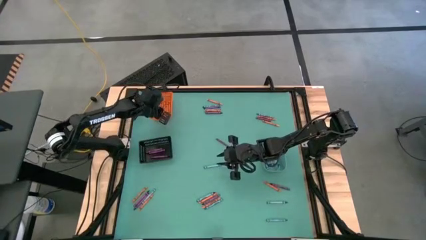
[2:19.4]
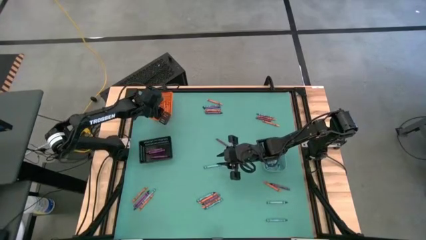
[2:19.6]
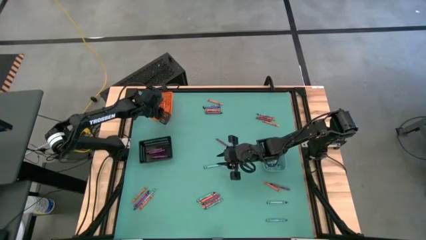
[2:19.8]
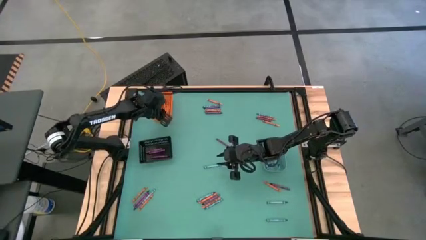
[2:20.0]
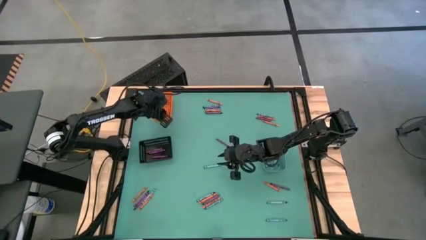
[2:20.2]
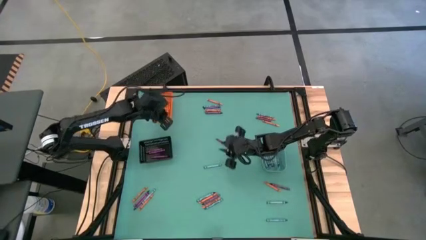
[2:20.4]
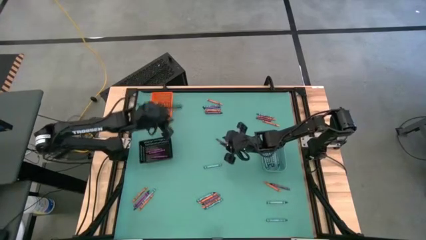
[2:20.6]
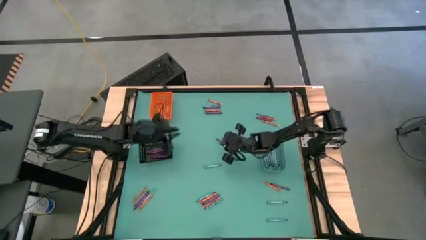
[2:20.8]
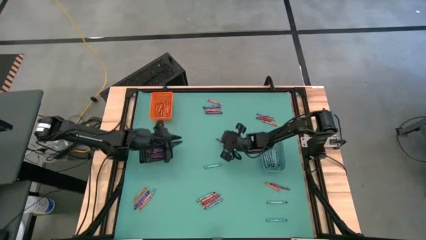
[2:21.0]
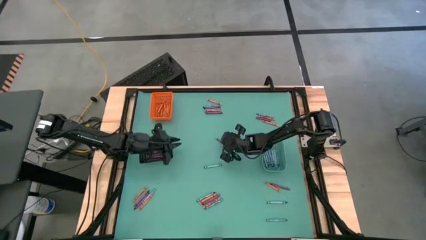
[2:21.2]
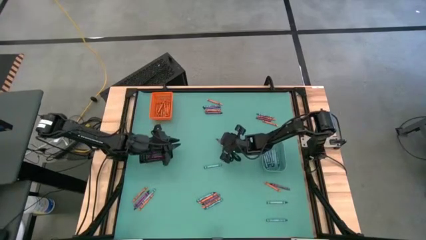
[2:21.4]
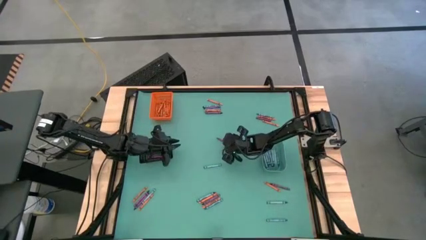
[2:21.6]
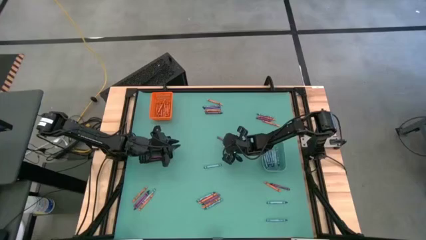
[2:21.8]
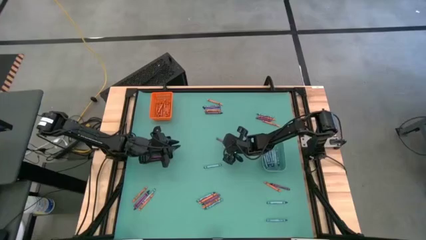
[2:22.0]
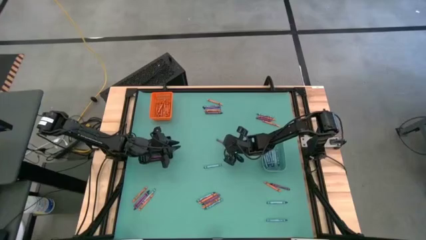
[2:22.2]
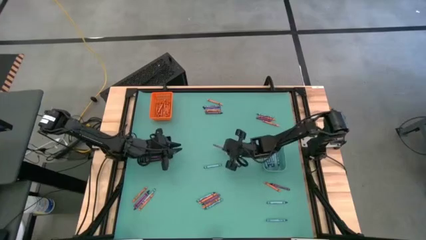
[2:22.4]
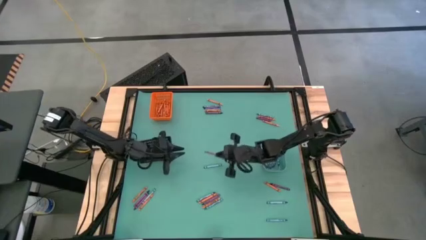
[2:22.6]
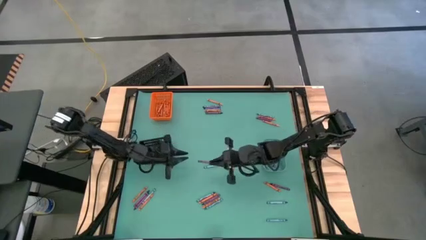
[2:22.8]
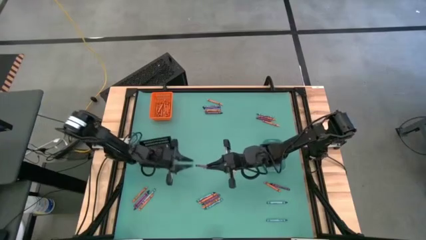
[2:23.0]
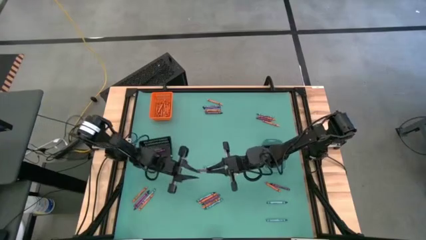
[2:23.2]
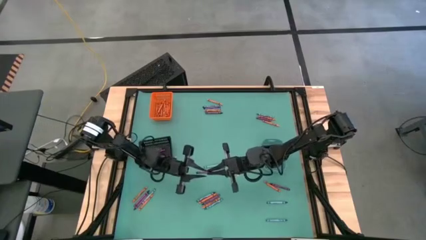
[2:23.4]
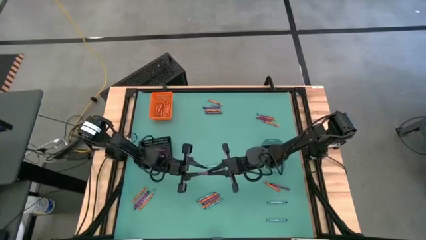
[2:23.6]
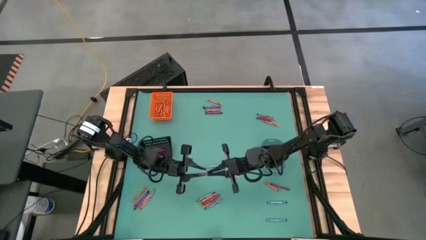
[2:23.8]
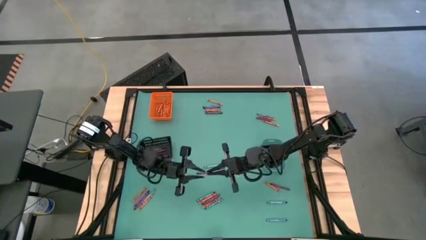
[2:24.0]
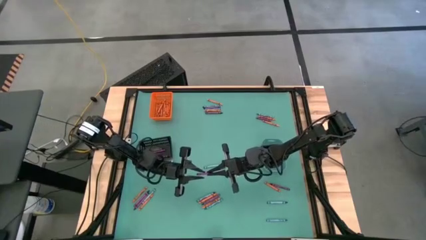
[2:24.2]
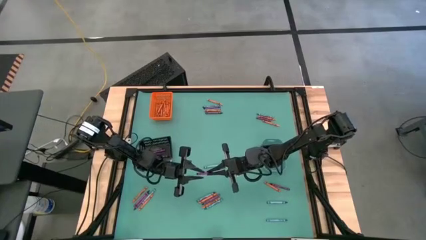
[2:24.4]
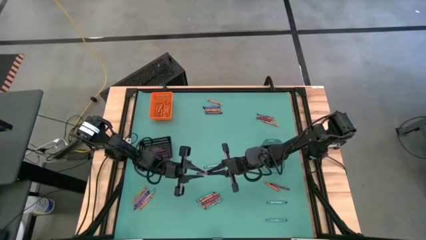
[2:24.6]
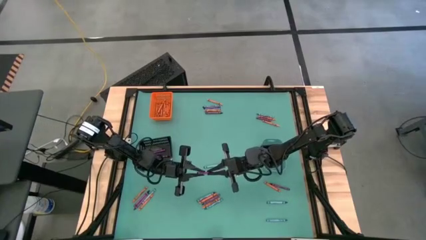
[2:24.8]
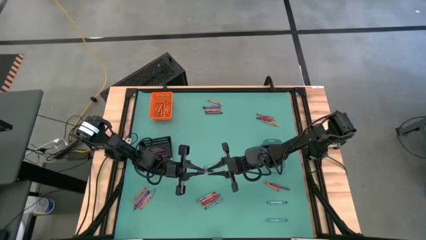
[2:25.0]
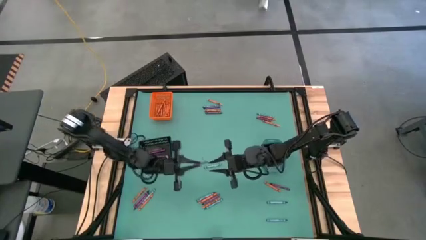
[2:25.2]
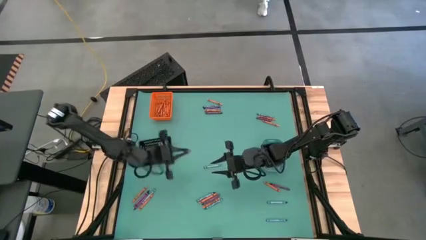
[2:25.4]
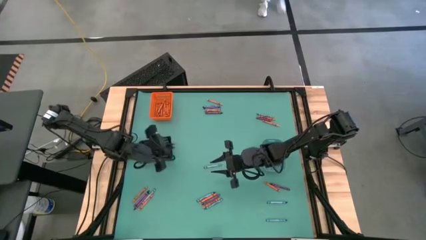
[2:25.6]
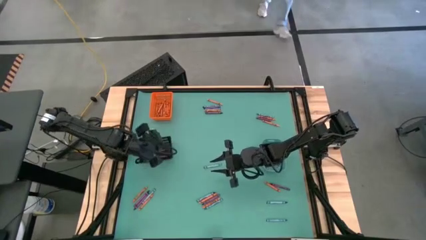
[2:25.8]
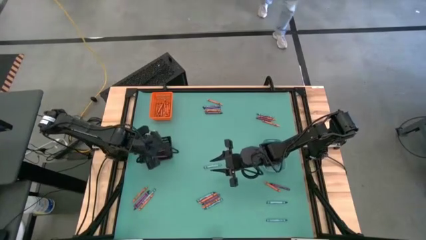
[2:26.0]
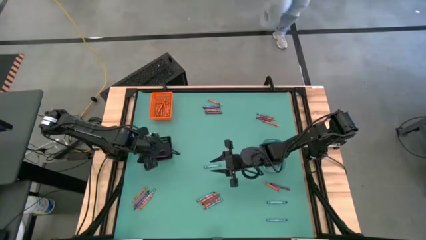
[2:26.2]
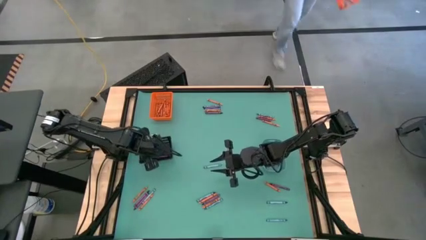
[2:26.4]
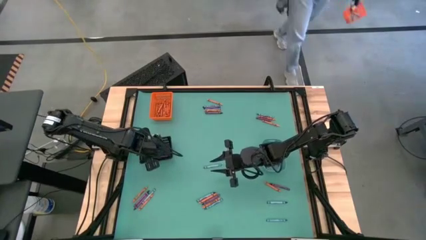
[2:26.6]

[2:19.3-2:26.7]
Task: Sort crayons
Put the violet crayon into the black bin

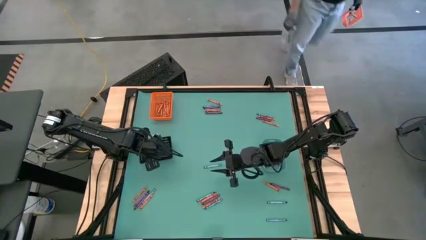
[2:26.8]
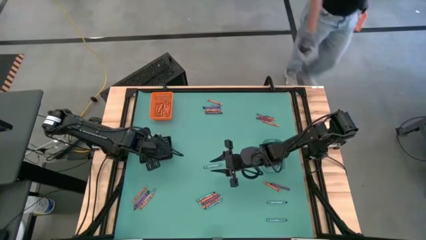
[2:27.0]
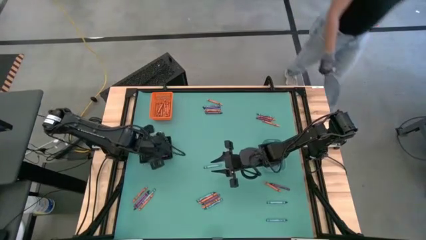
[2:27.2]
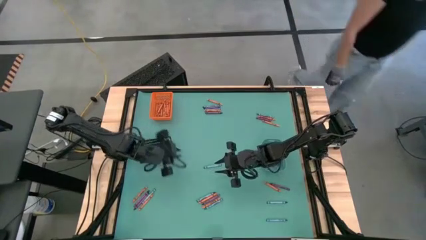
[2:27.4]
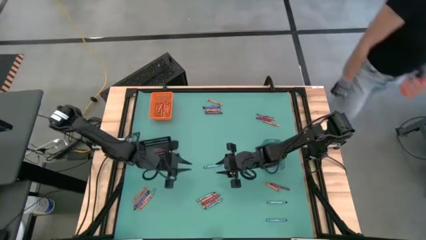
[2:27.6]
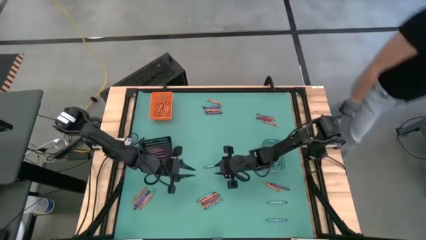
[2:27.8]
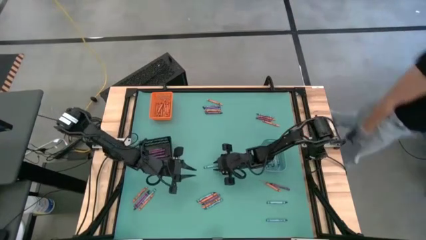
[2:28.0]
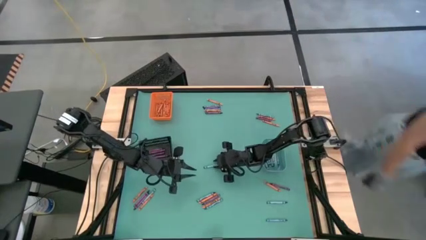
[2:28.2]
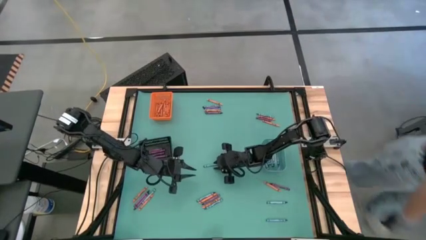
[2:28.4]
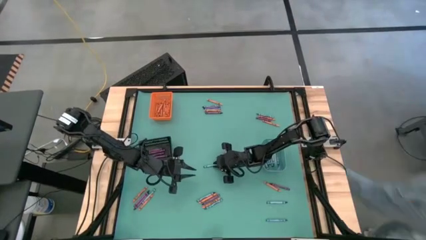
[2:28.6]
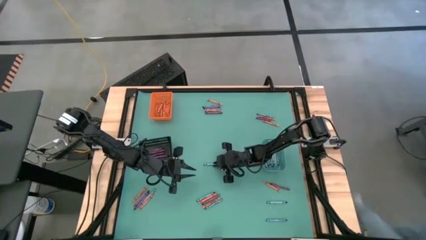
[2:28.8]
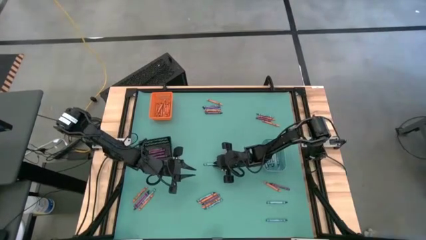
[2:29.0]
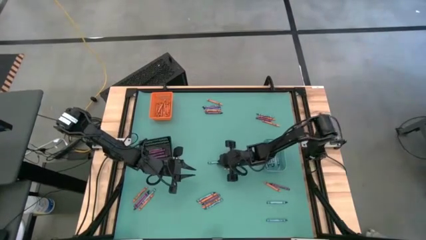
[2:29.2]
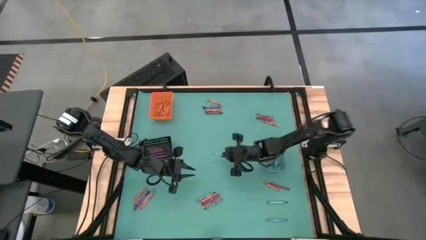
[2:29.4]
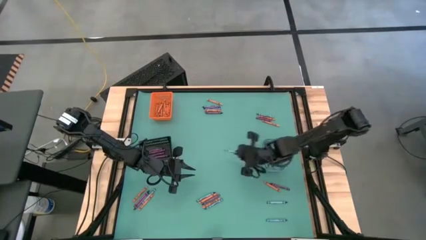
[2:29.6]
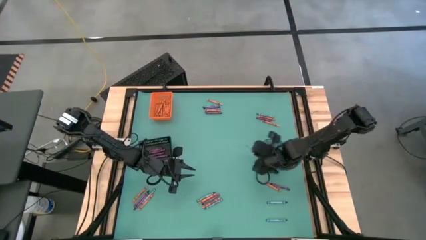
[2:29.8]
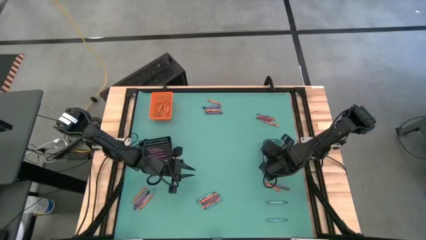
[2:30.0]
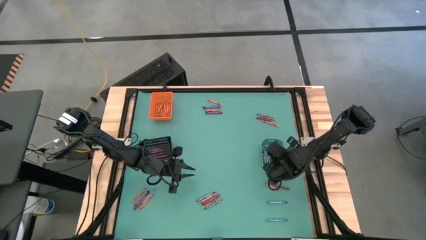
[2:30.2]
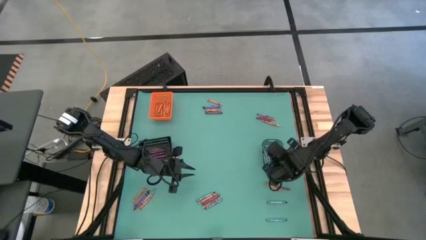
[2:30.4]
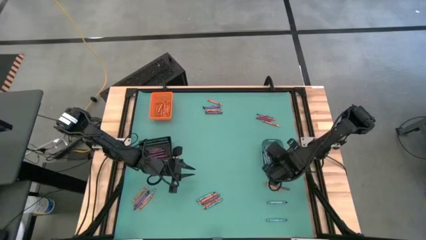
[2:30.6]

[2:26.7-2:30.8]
Put the blue crayon into the blue bin

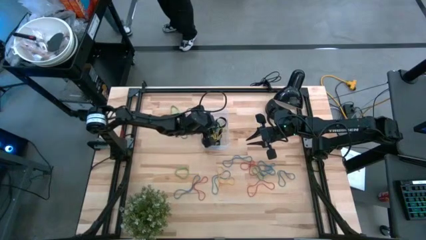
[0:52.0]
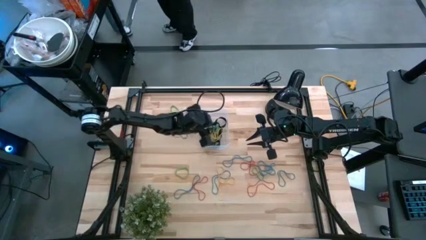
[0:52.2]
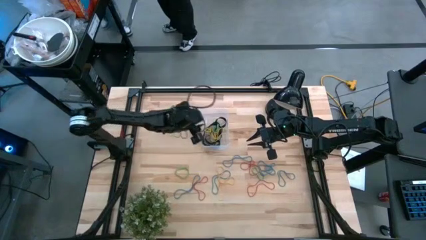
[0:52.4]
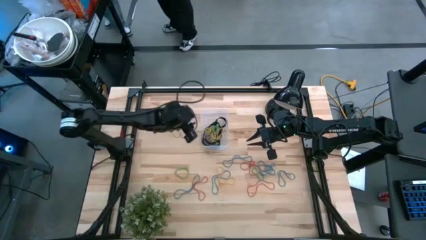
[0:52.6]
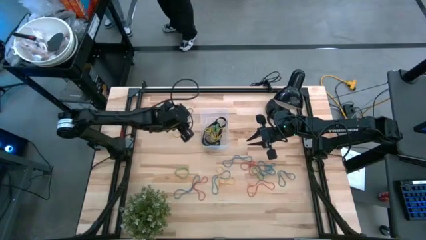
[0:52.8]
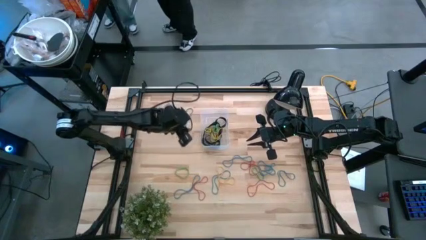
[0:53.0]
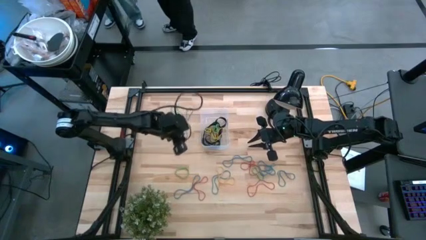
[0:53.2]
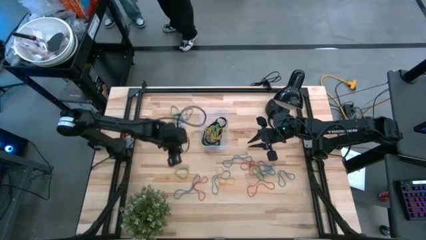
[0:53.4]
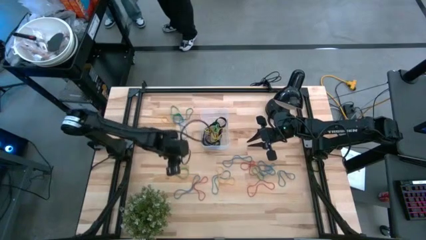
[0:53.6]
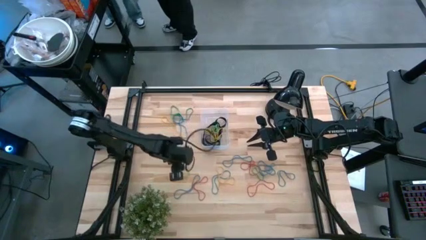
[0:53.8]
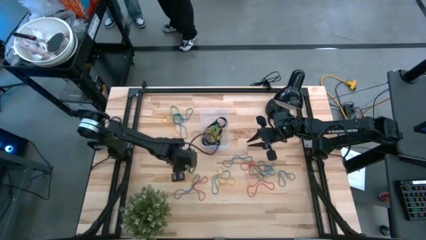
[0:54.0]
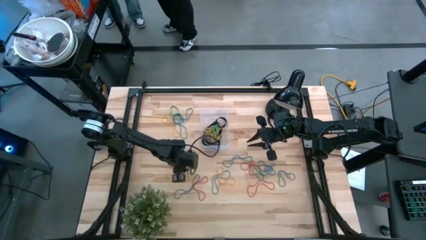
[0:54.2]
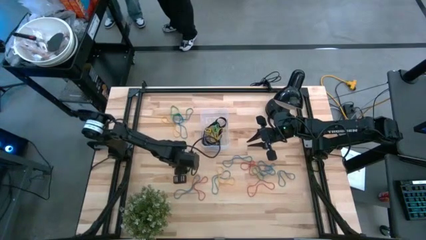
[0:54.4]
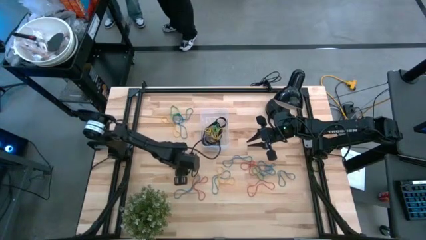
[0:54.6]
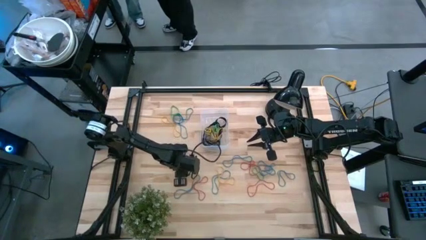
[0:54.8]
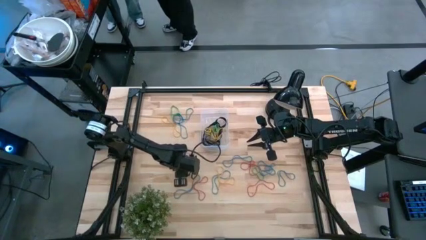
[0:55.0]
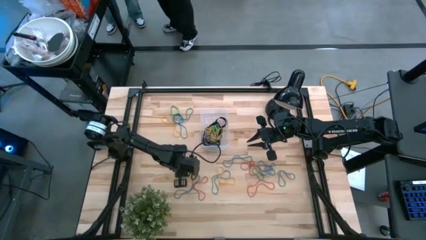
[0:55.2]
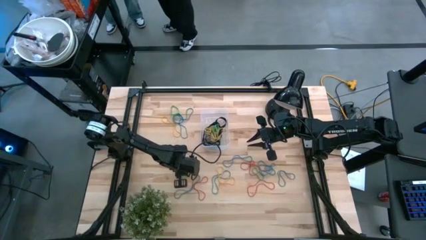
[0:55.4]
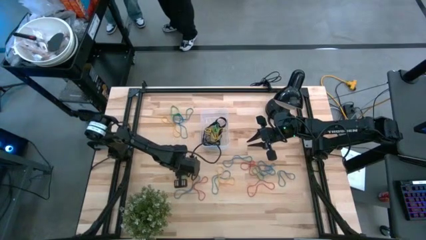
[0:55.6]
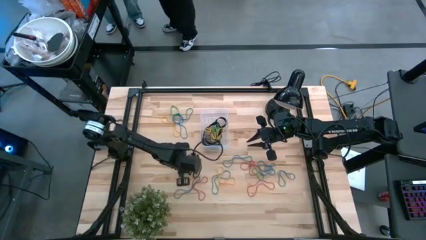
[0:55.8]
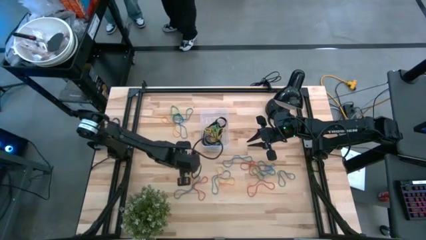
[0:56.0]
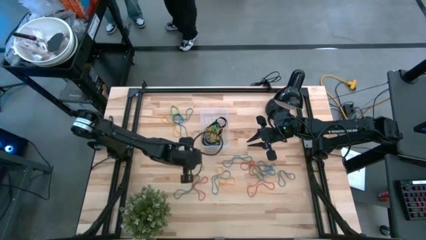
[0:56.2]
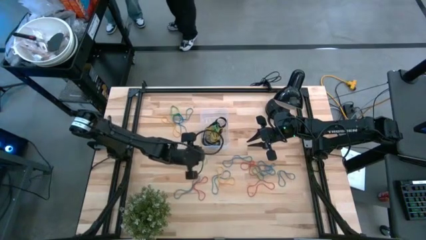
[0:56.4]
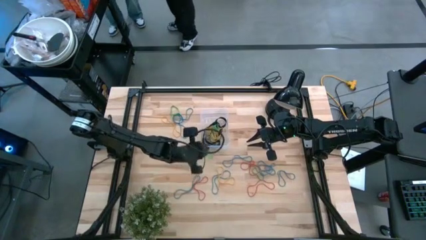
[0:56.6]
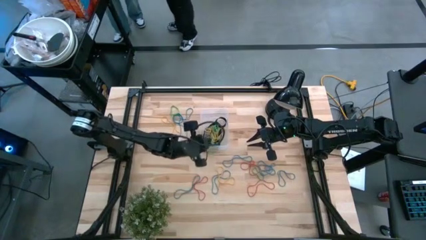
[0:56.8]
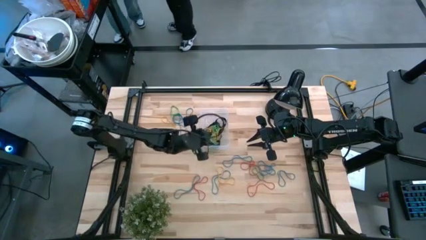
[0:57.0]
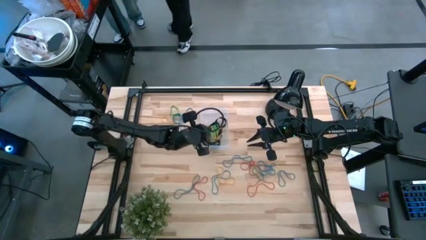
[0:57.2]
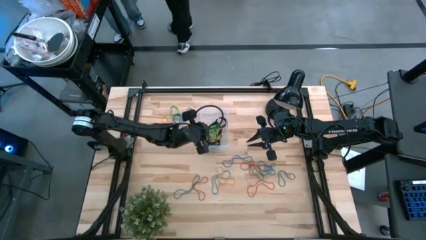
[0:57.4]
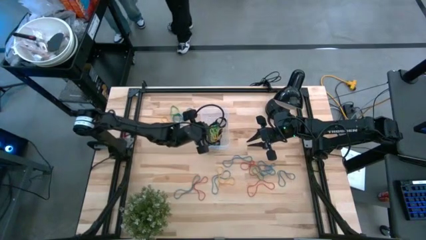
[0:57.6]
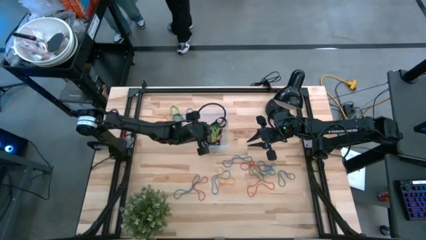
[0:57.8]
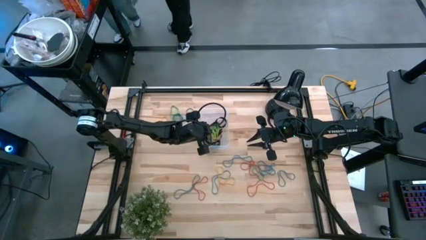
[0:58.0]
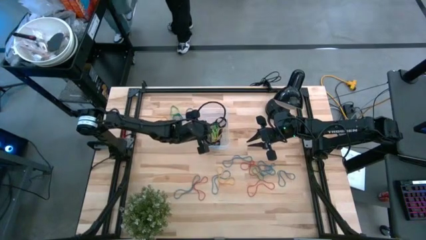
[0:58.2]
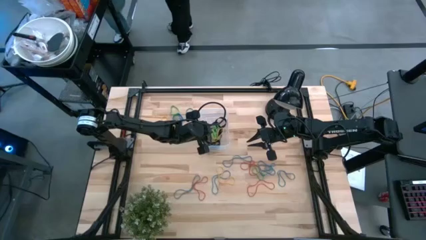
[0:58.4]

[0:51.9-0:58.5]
Task: Pick and place rubber bands into bin
Put the green rubber band into the transparent bin
